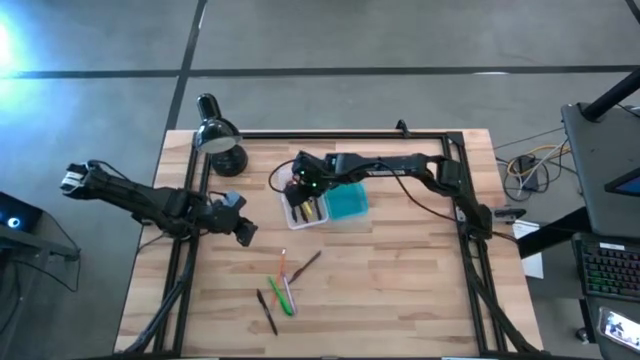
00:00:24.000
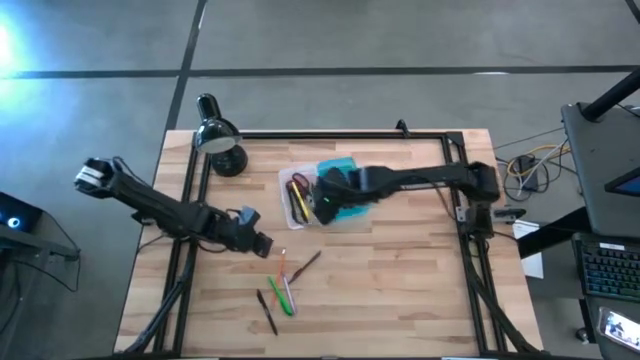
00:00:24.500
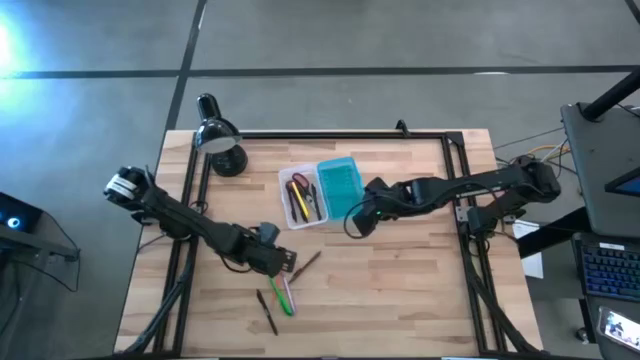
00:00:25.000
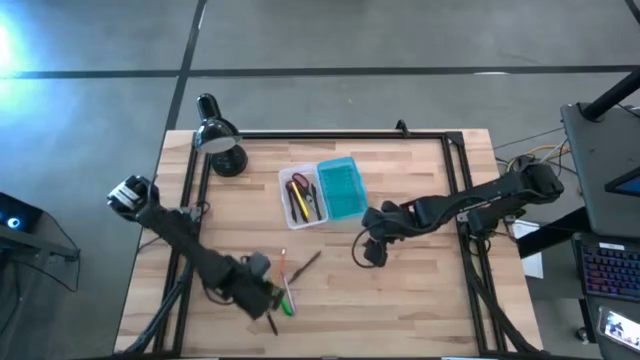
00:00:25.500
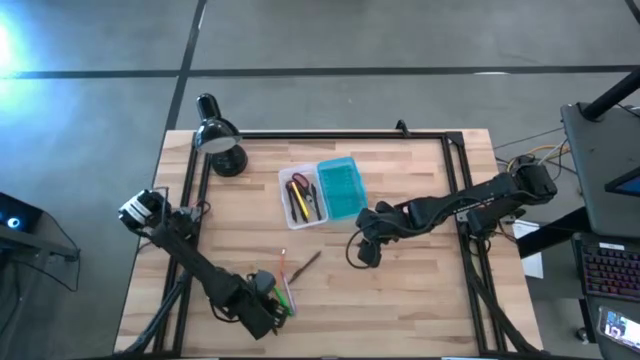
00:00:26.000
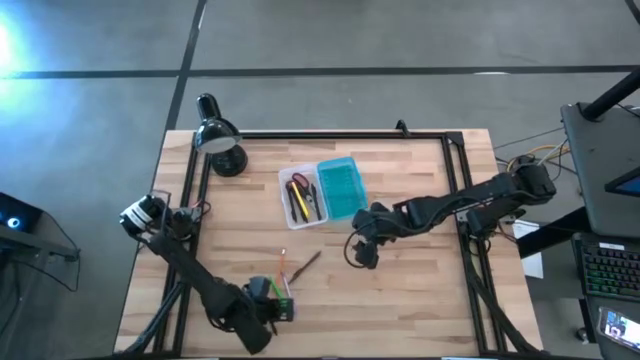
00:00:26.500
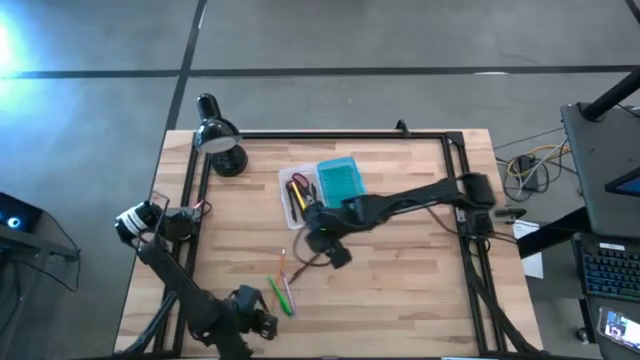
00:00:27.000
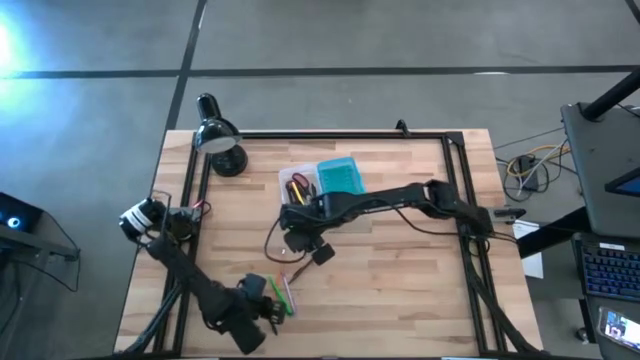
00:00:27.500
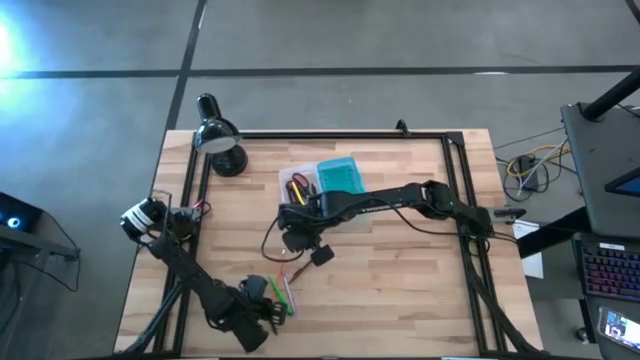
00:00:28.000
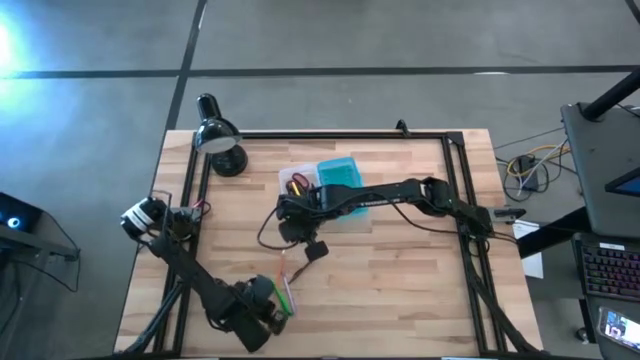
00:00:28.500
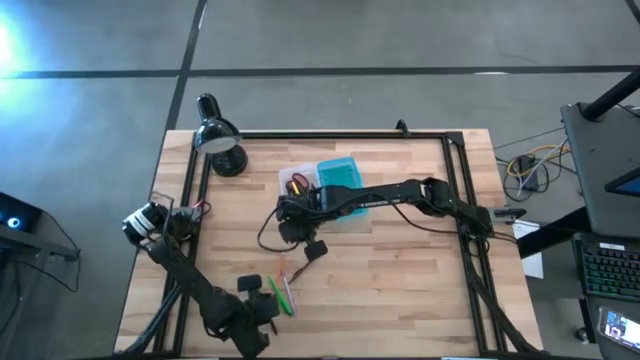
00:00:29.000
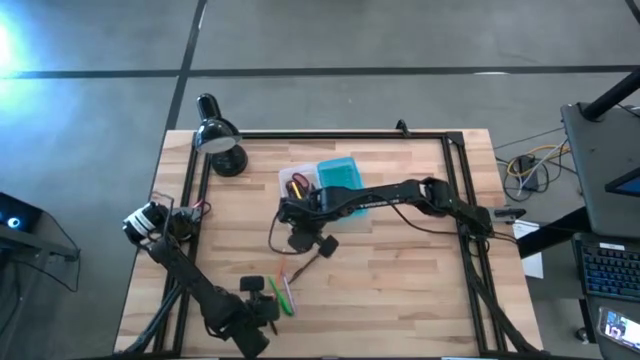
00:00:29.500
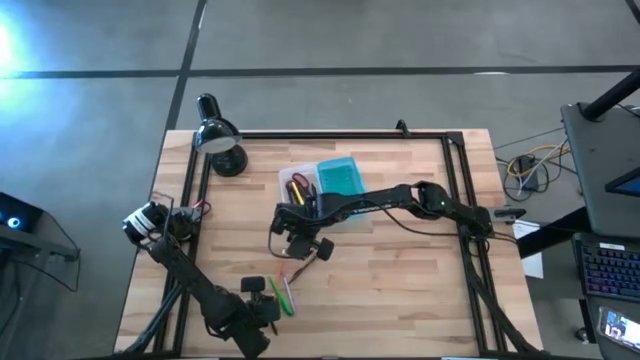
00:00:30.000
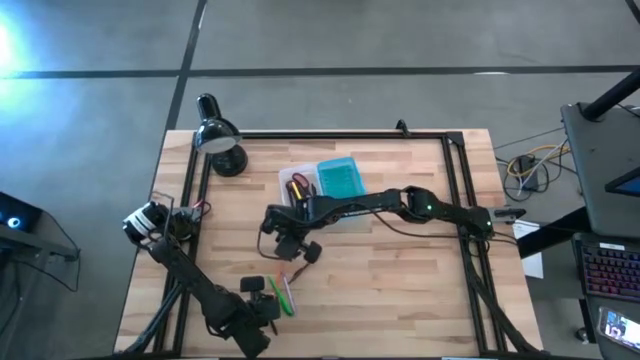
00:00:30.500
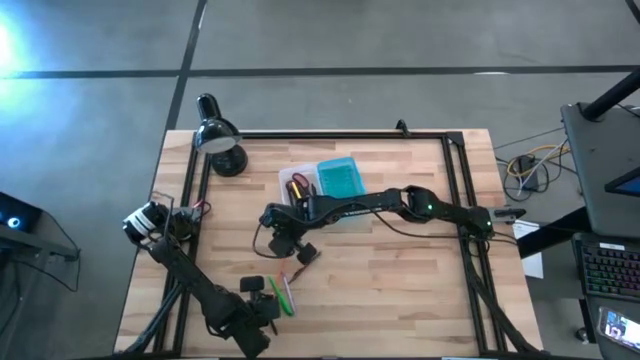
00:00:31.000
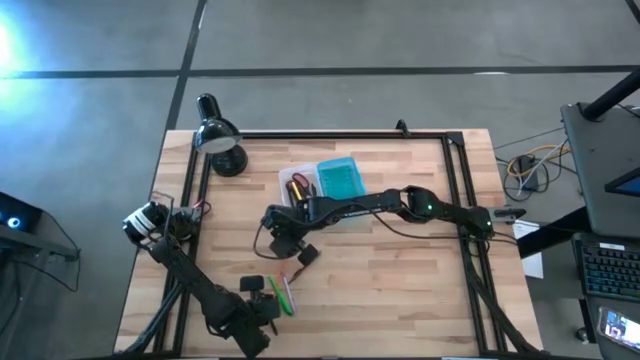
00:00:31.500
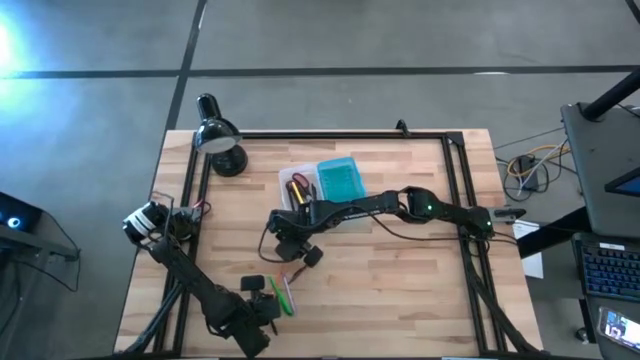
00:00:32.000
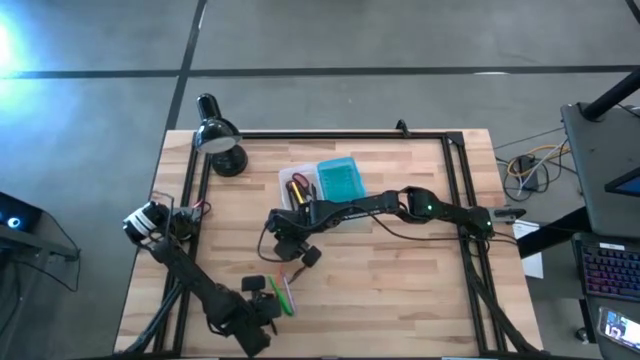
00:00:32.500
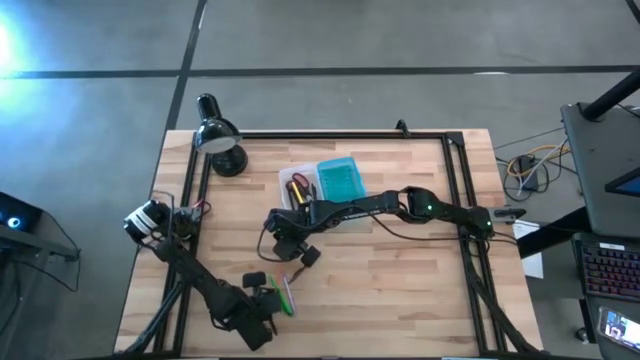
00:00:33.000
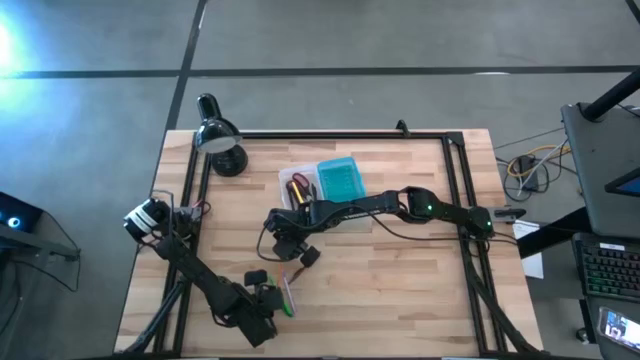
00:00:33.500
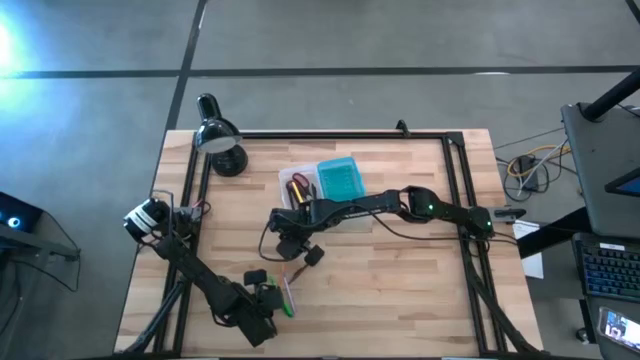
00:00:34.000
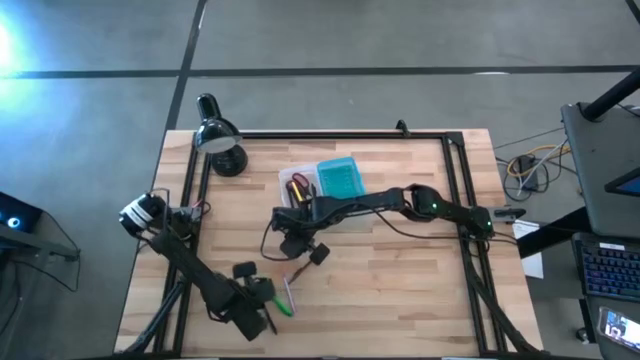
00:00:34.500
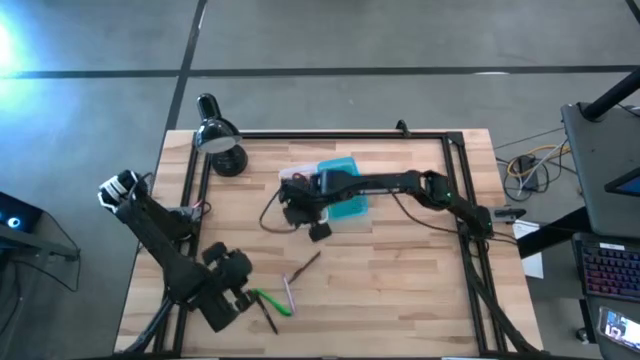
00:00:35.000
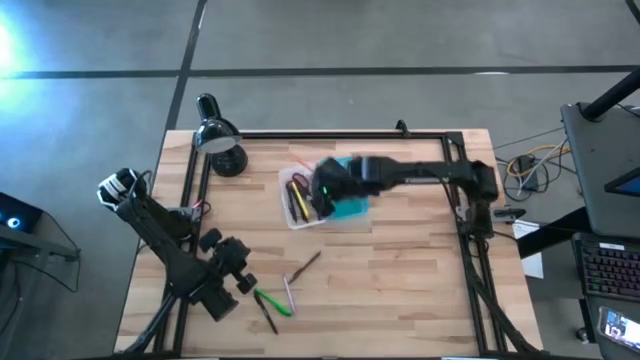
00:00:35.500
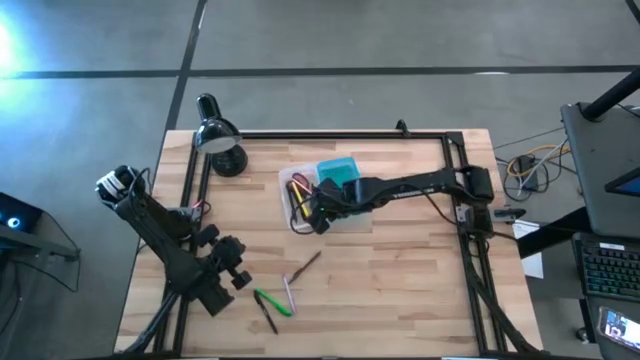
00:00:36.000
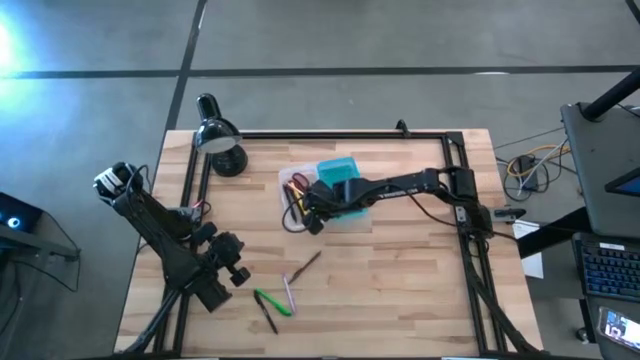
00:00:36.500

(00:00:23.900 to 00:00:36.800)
Task: Pick & place school supplies into a supply box
Put the pencil into the supply box

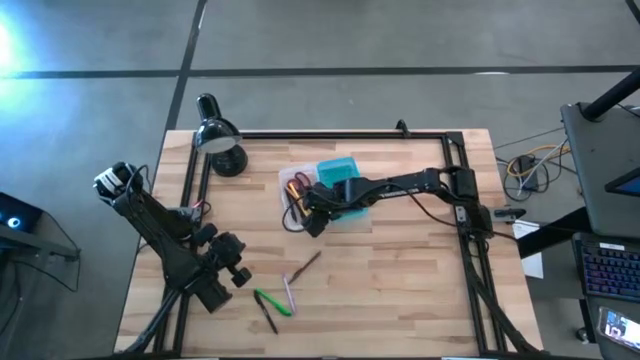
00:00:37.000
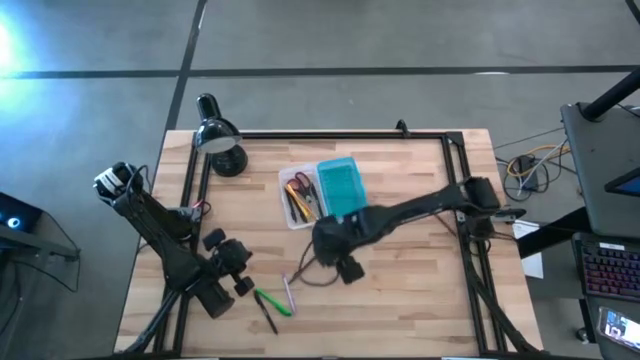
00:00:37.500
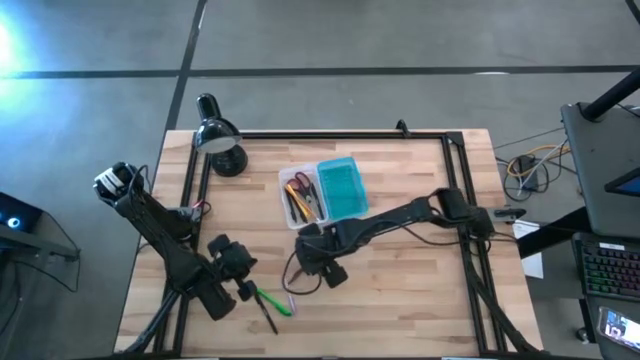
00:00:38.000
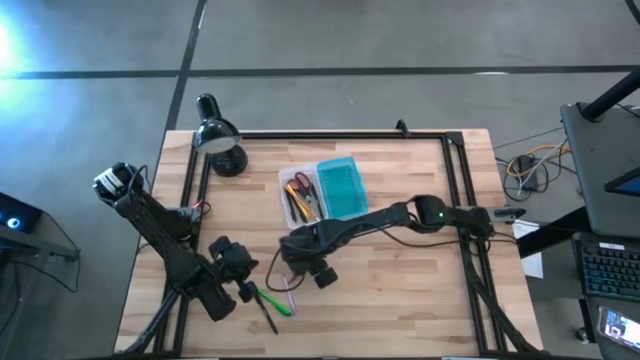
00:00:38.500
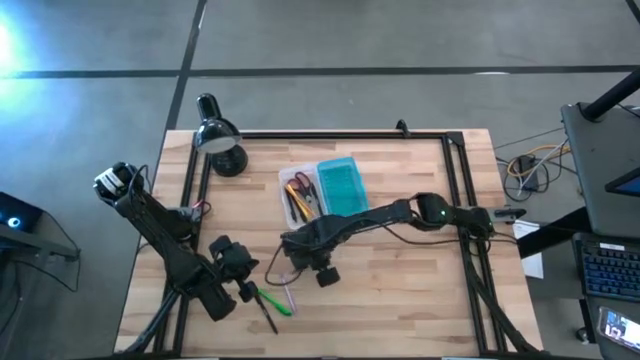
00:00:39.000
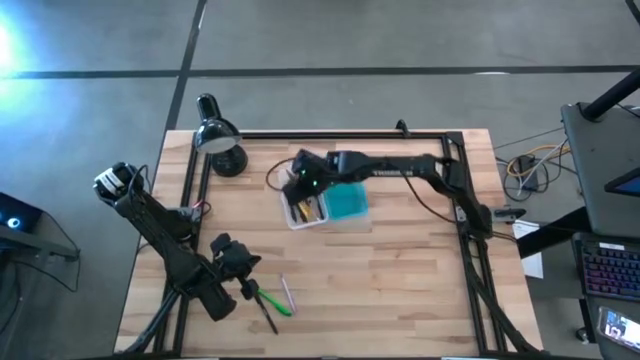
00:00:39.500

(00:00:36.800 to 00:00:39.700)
Put the brown pen into the supply box

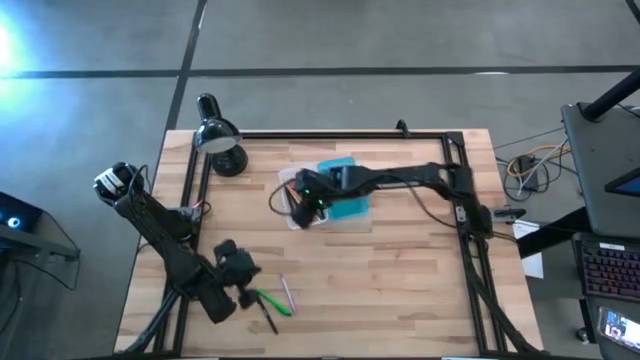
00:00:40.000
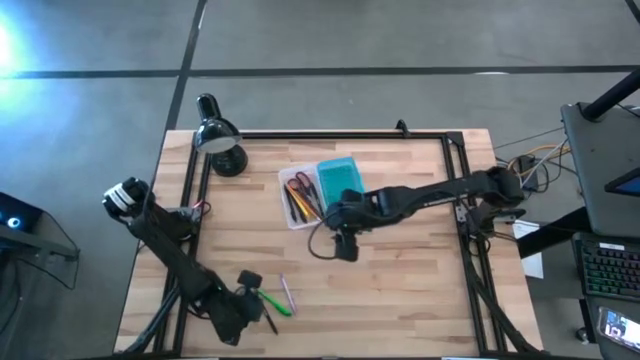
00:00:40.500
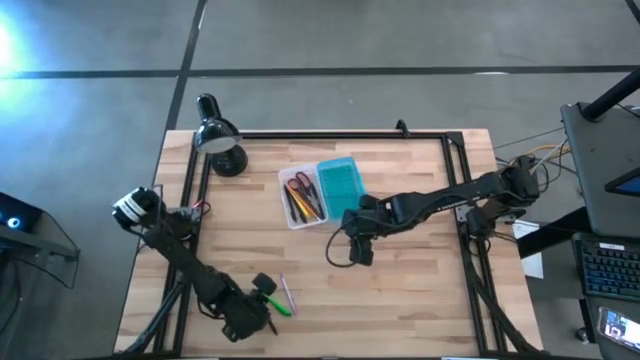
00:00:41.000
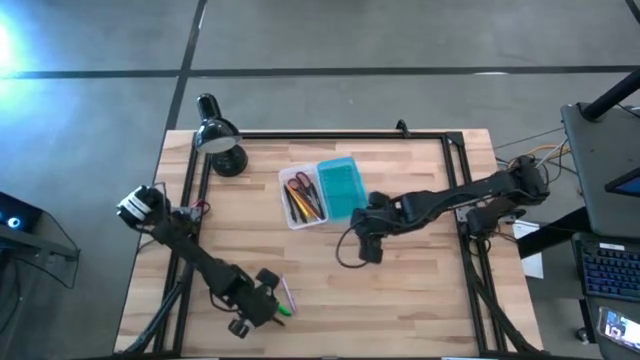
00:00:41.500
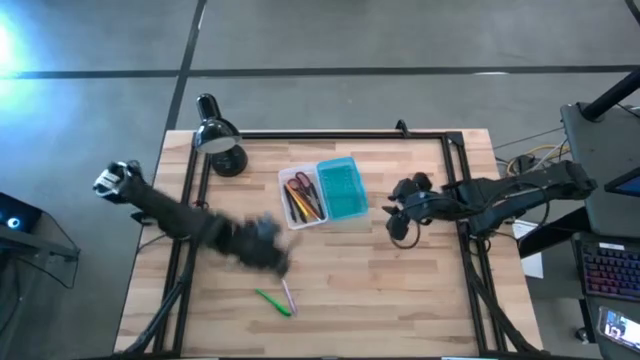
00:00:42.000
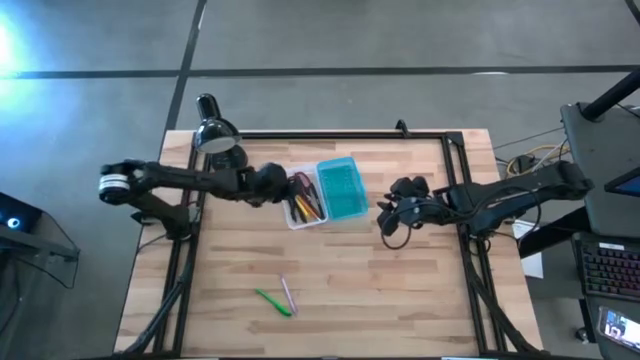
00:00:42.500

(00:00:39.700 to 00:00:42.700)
Put the black pen into the supply box

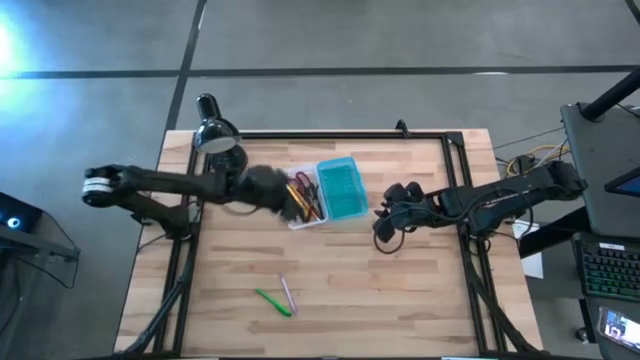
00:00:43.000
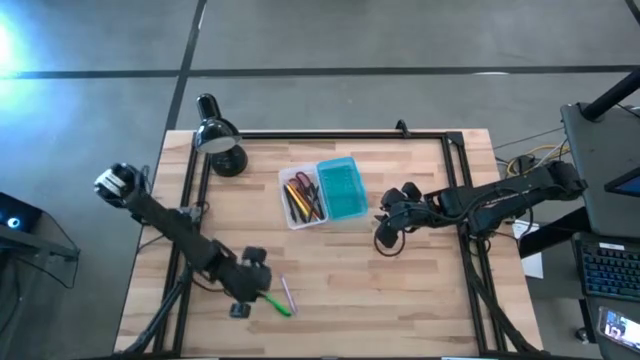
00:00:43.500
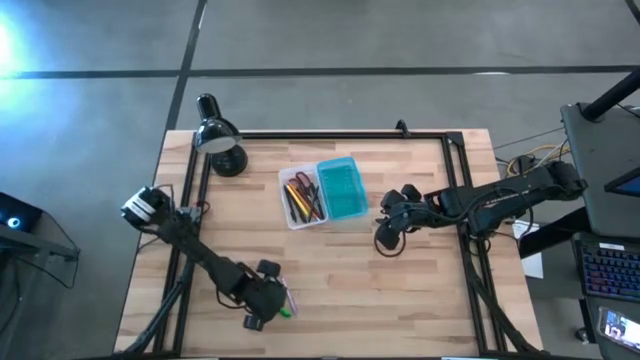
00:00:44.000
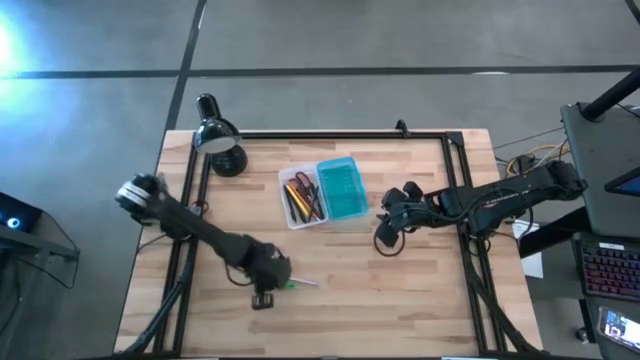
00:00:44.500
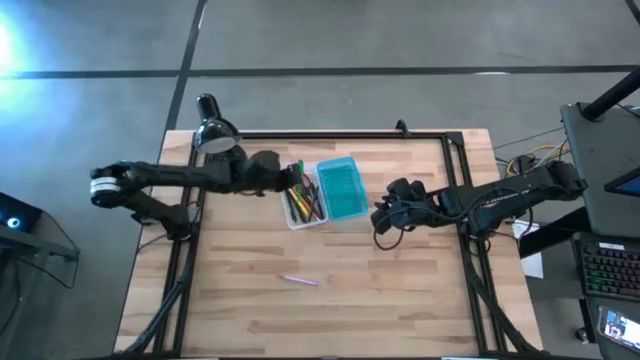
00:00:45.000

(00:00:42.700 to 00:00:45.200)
Put the green pen into the supply box

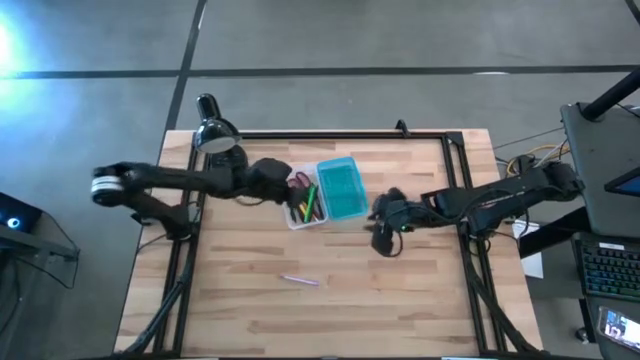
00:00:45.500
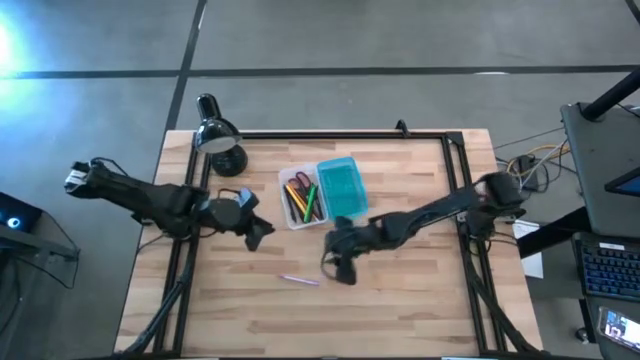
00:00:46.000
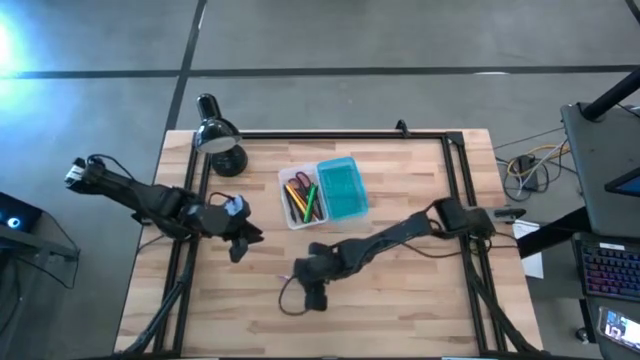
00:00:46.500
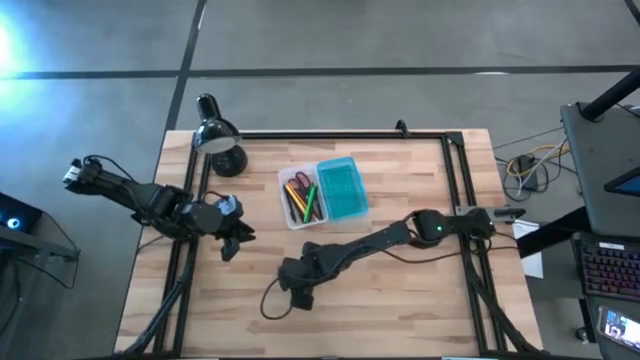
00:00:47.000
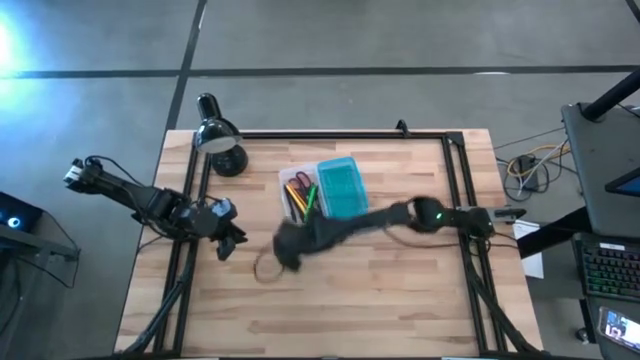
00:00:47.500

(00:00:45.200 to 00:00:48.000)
Put the transparent purple pen into the supply box
